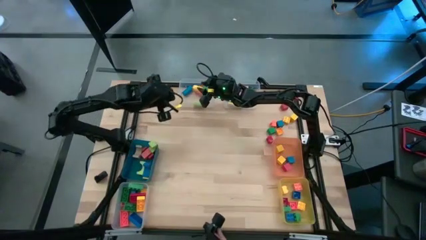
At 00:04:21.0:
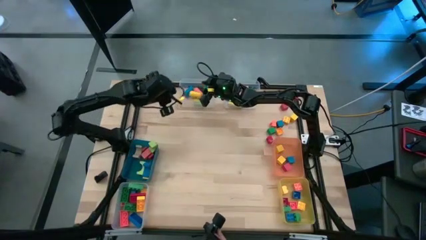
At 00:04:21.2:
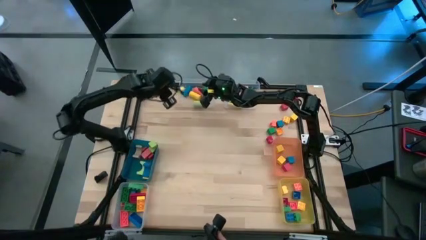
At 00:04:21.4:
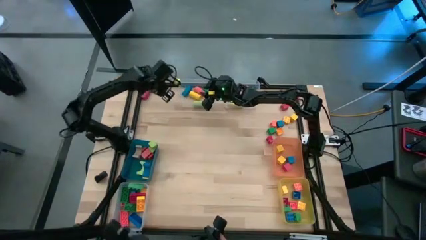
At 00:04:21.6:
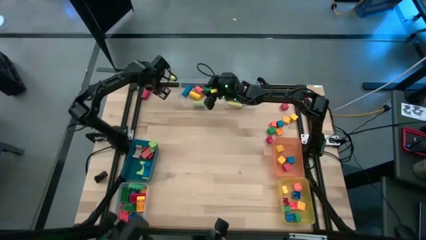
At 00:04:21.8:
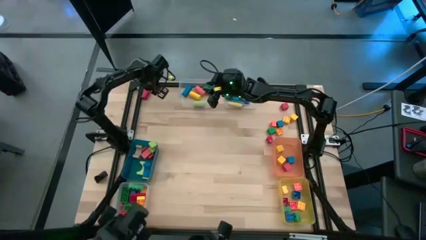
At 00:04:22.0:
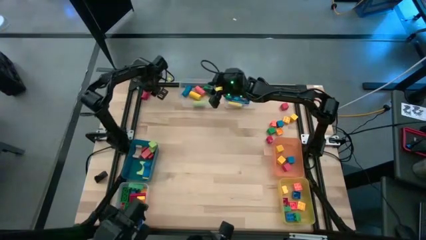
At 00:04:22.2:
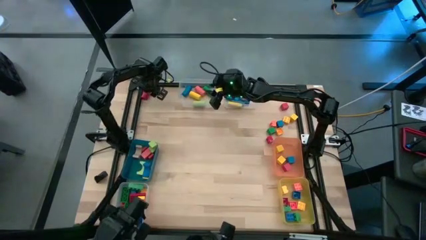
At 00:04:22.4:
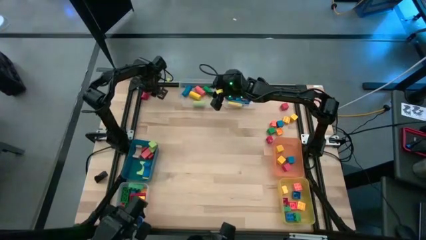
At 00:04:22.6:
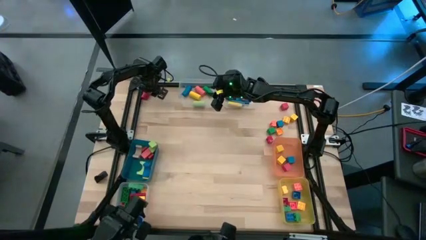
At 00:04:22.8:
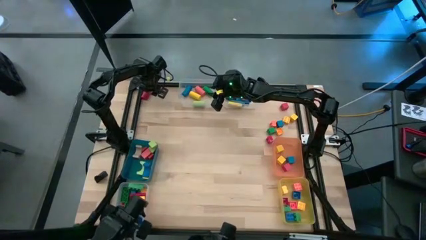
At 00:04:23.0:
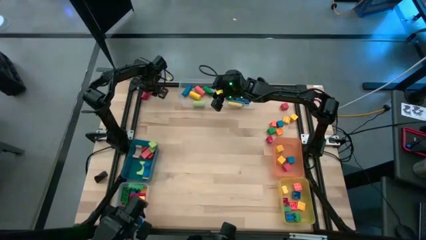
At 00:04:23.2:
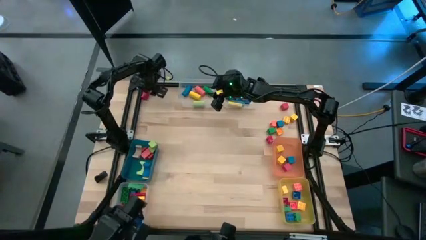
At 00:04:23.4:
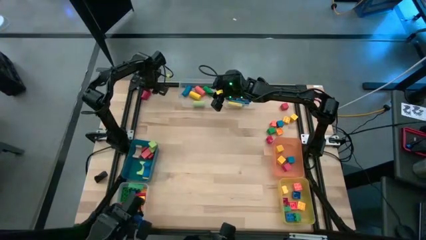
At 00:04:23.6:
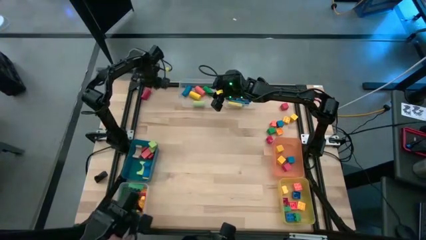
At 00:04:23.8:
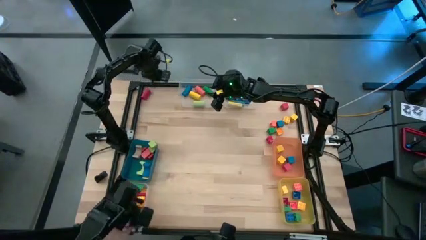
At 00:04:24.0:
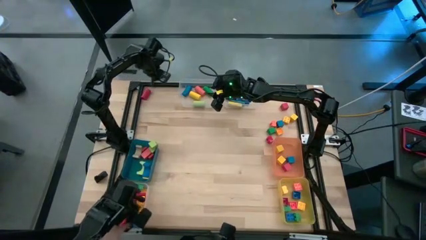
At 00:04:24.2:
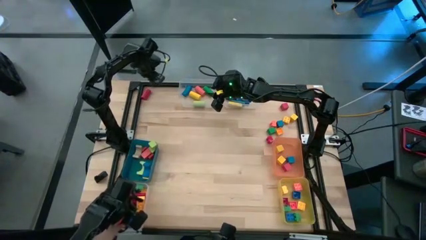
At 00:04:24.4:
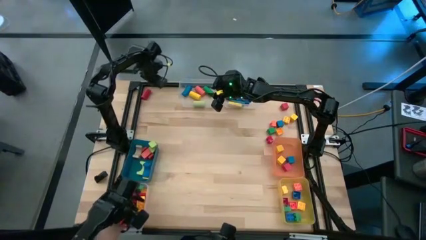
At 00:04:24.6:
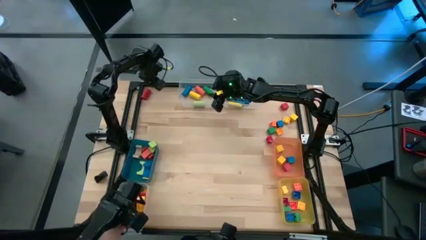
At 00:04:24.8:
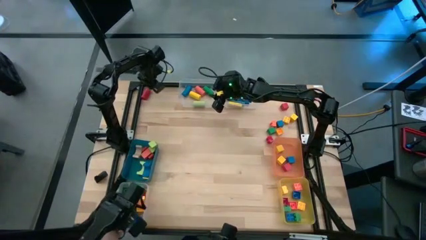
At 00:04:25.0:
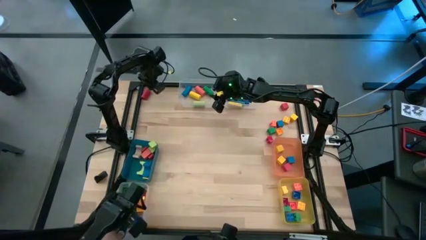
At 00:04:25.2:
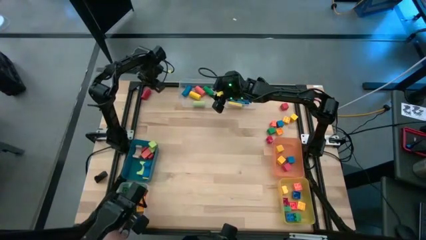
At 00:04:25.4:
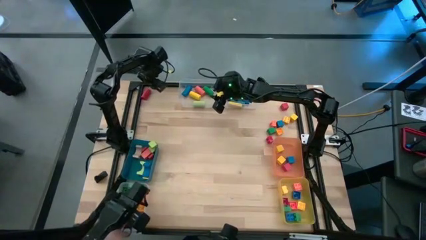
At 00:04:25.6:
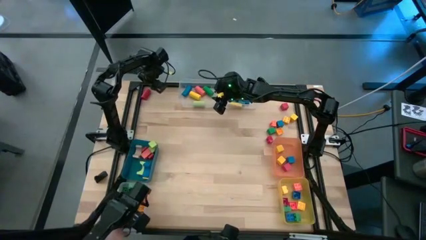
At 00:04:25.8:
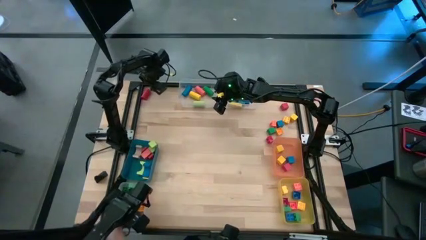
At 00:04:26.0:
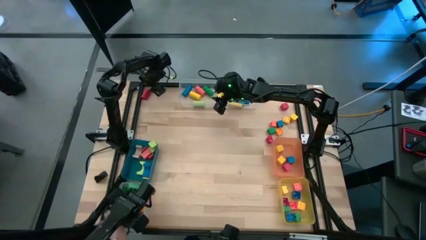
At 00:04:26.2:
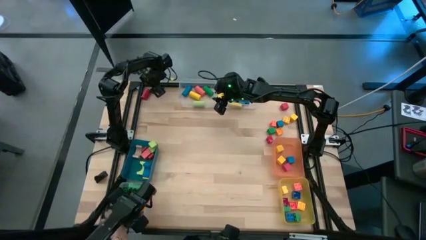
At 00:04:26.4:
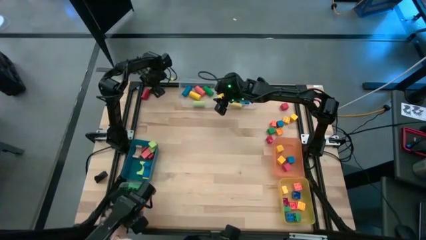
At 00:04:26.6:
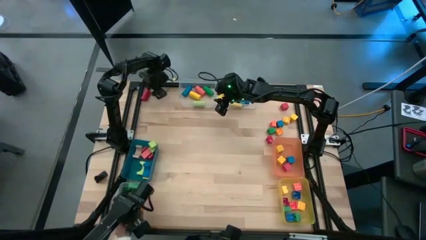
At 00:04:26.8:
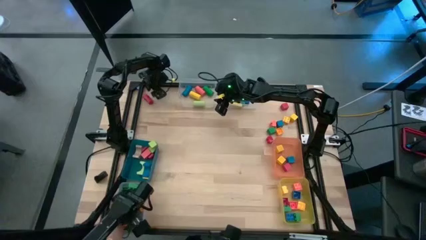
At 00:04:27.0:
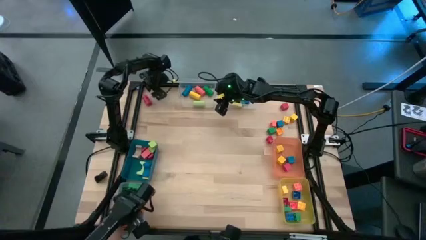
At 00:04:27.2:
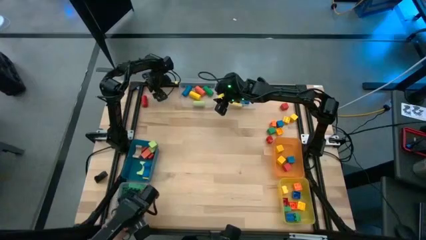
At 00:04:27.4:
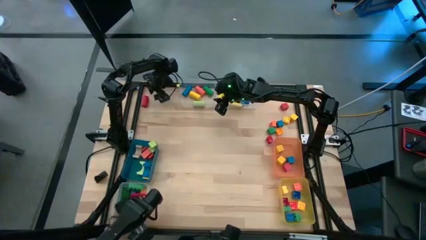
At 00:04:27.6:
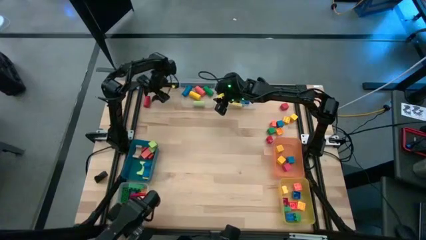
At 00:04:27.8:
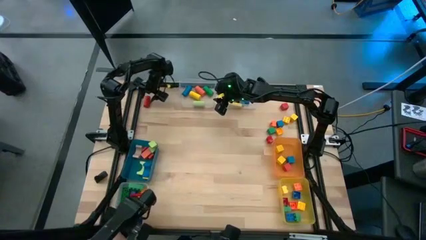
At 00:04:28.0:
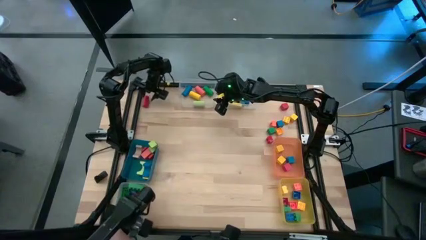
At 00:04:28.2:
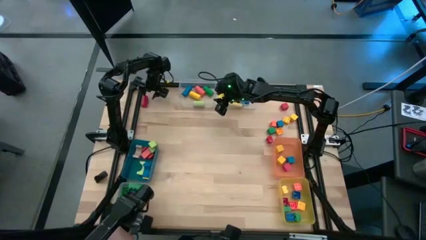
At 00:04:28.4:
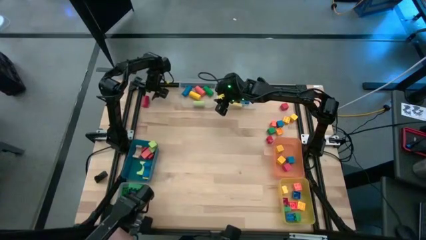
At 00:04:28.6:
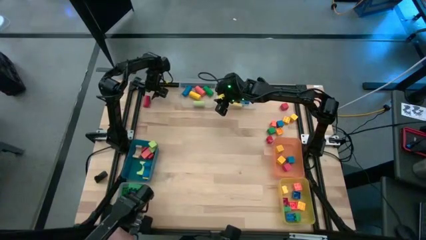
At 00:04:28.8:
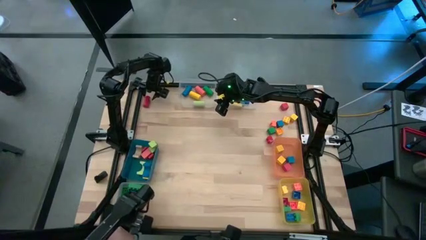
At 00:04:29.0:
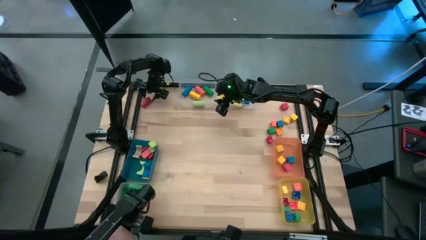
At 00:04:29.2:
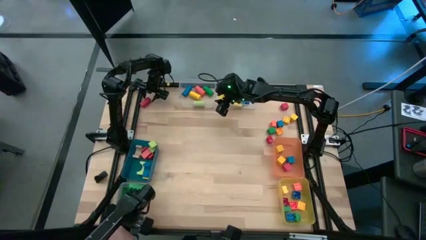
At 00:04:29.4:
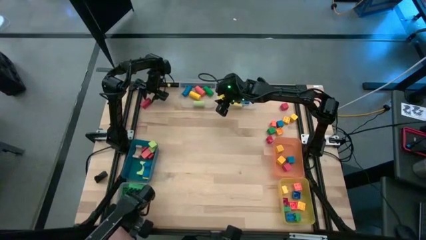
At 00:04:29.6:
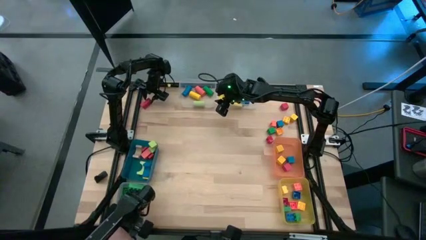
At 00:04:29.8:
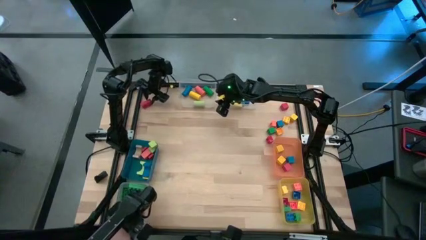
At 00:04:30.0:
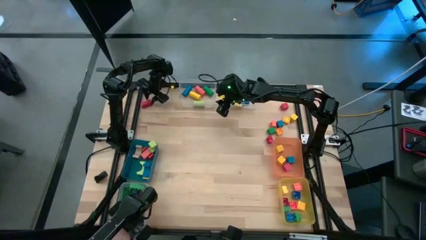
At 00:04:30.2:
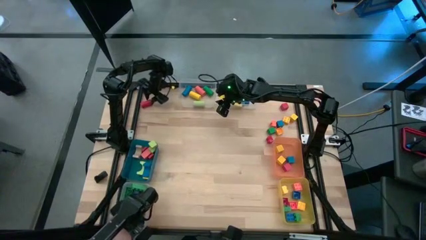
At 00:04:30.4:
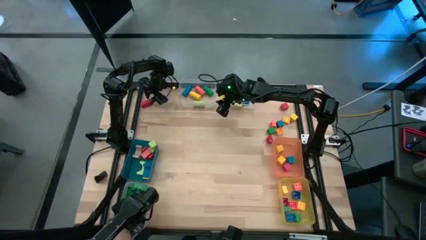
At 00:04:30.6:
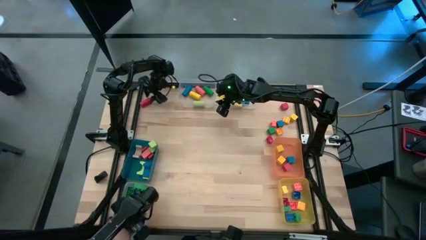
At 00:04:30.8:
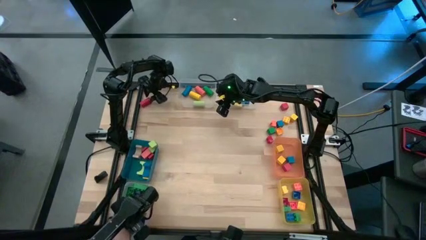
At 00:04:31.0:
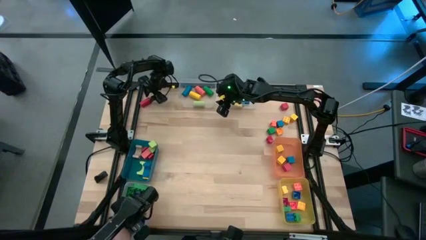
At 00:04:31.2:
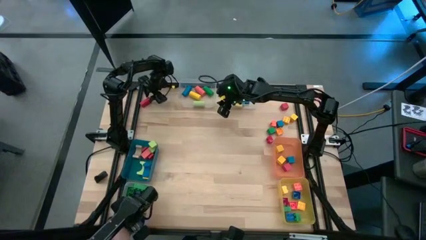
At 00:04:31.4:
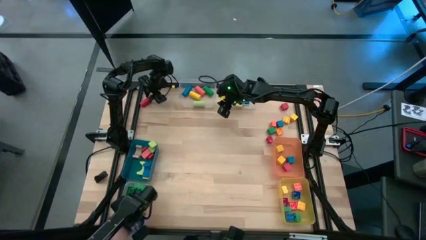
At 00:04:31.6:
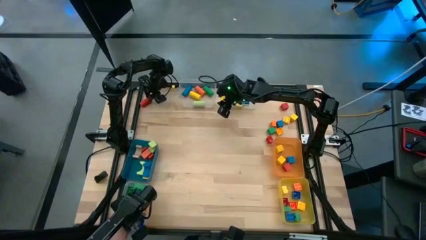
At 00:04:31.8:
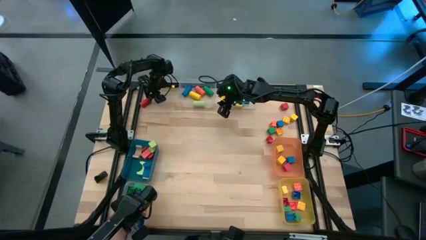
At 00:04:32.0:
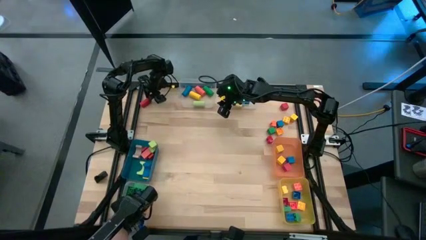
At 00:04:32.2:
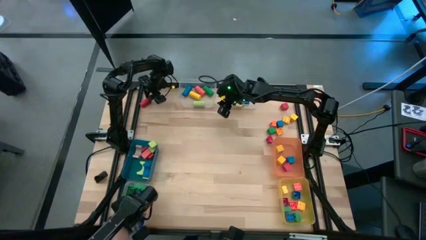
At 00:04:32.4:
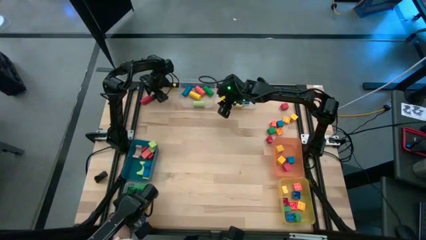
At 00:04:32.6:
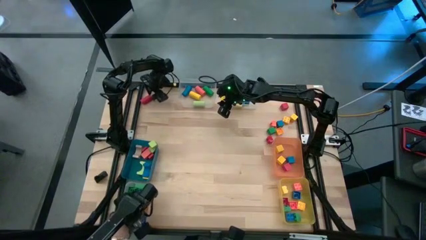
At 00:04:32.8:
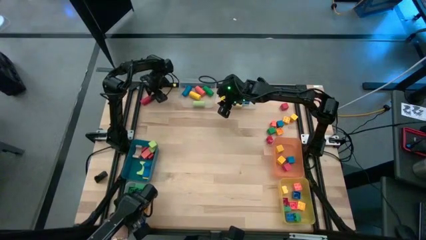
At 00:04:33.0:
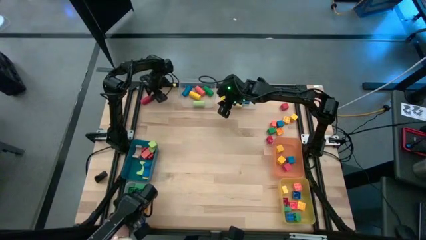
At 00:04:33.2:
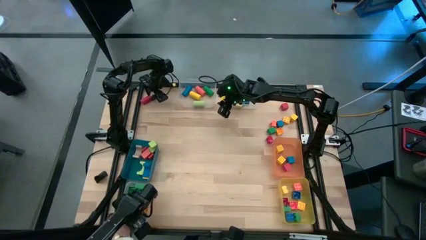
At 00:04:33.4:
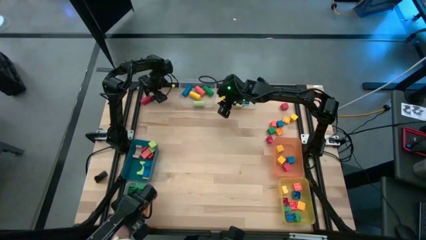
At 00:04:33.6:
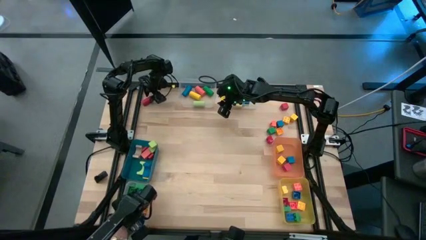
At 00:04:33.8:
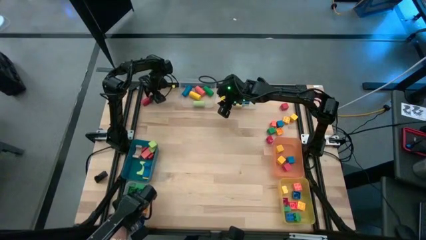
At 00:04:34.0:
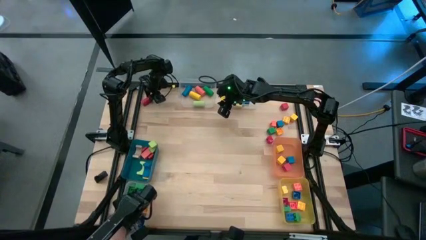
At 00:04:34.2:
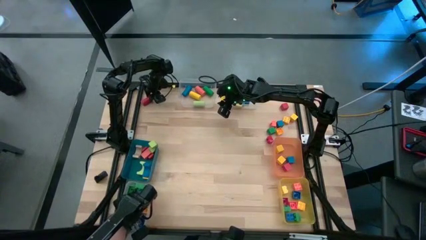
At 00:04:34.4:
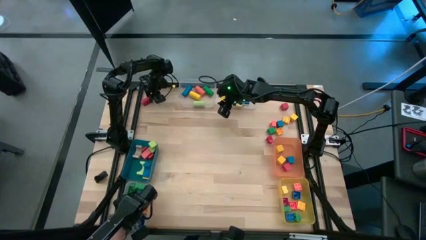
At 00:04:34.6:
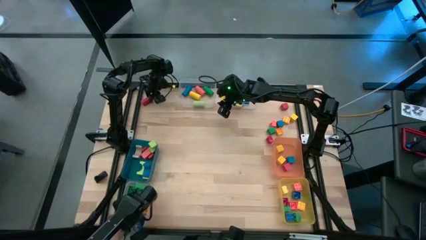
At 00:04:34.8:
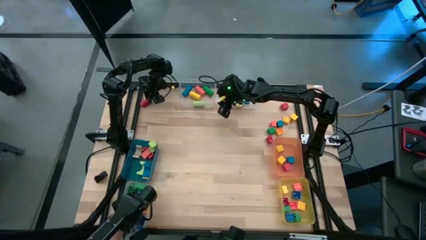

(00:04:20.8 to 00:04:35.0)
Task: Sort blocks by size
Put the red block into the top left transparent bin

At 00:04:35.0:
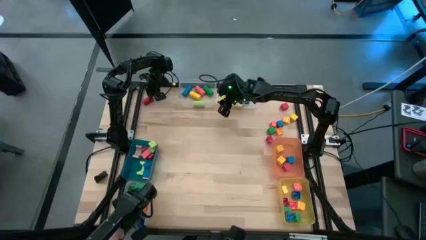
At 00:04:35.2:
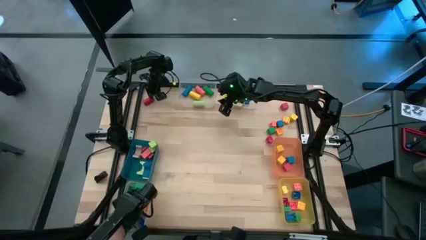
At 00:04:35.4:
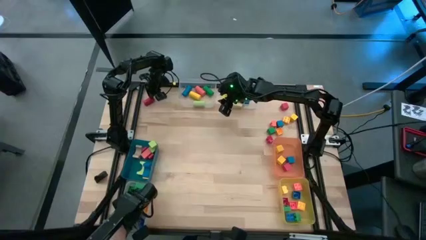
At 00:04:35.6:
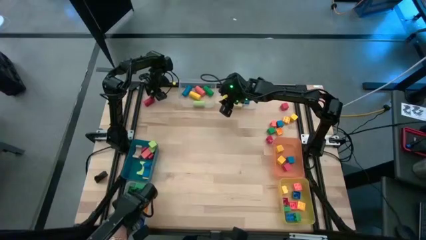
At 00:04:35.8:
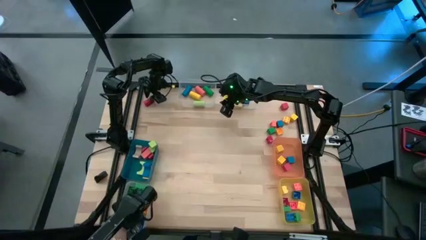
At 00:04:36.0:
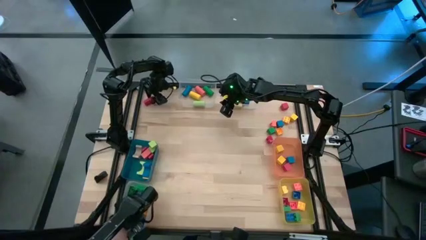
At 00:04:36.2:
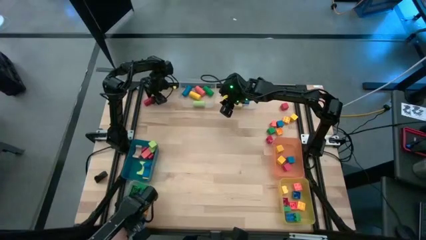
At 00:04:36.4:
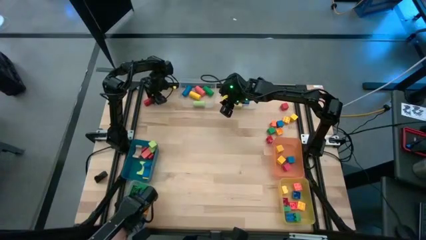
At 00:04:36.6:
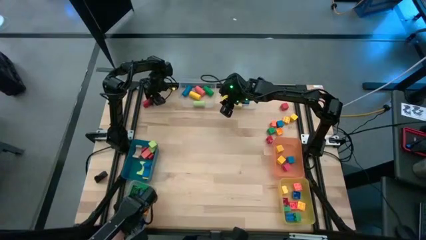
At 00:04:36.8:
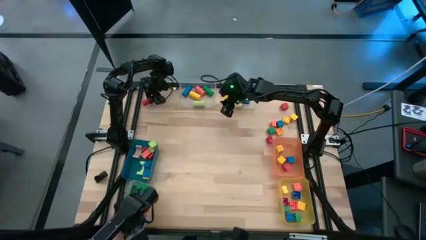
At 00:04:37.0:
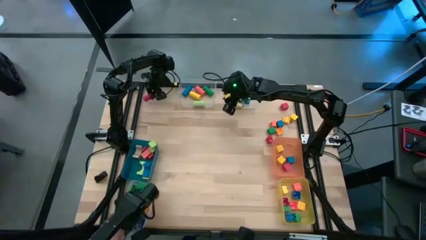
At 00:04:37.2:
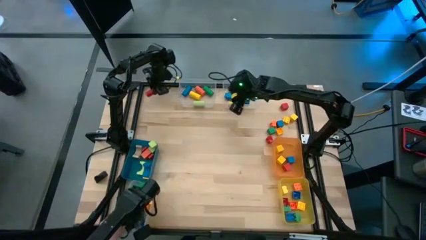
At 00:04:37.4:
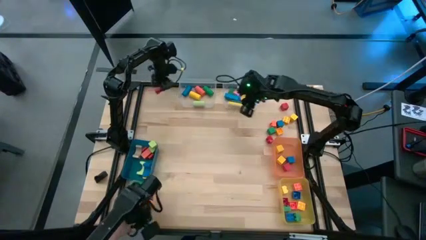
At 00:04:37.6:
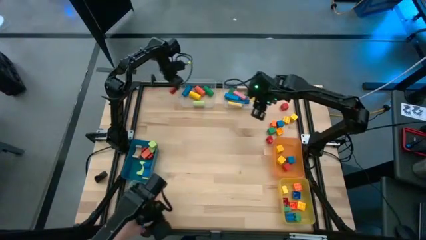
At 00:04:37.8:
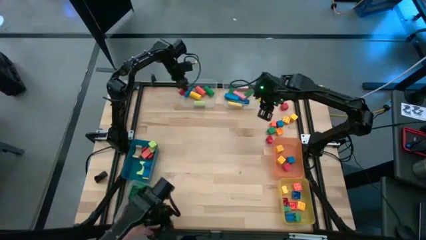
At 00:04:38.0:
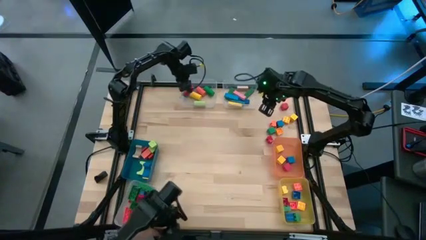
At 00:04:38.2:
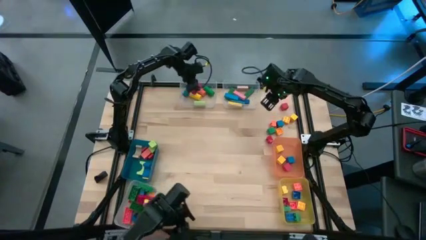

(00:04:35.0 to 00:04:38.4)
Put the red block into the top left transparent bin
